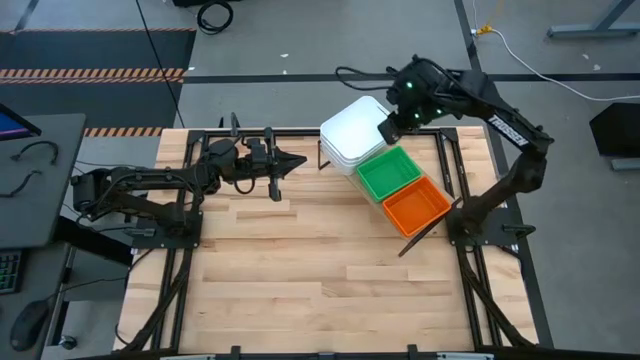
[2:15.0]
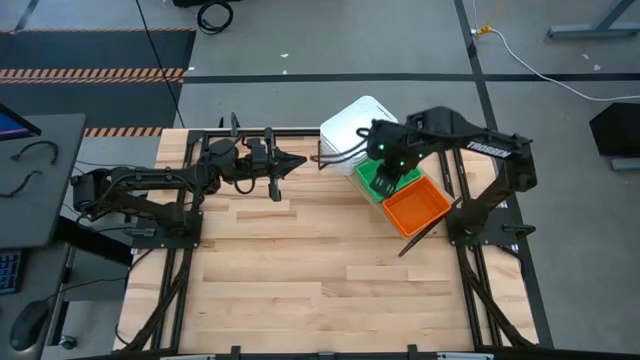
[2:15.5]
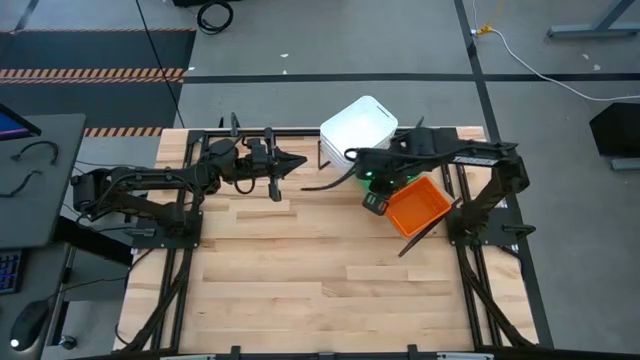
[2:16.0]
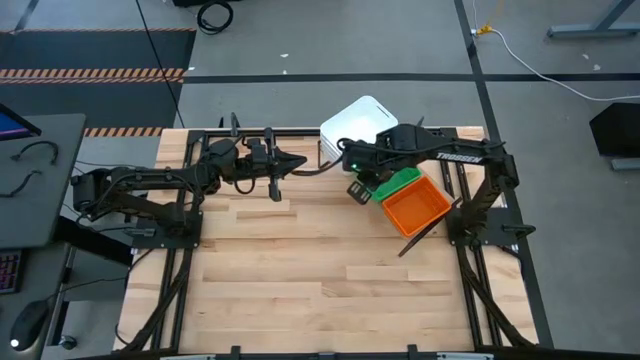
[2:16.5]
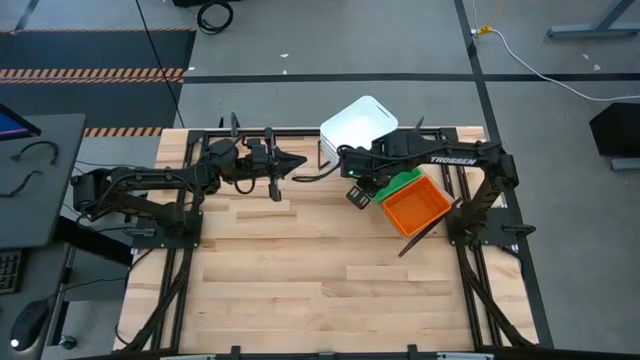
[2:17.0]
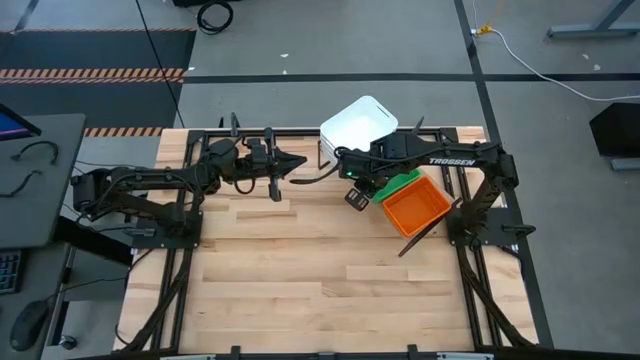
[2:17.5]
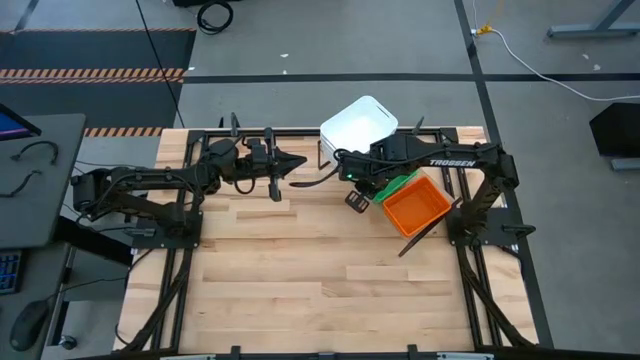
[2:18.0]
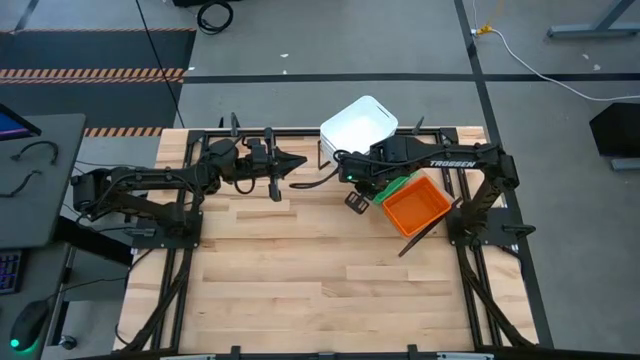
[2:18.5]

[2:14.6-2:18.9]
Task: Stack baskets on shelf by color
Adjust the stack of green bins

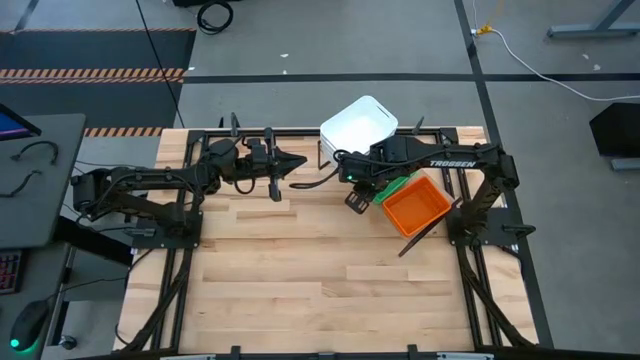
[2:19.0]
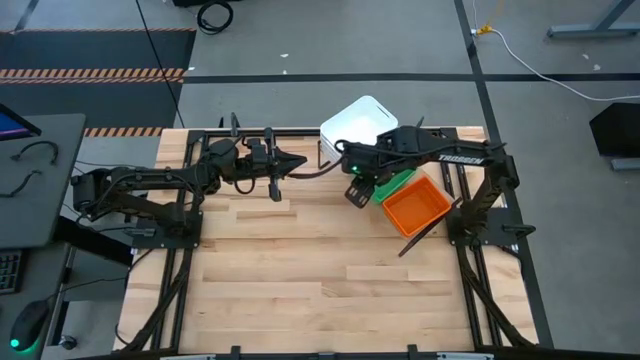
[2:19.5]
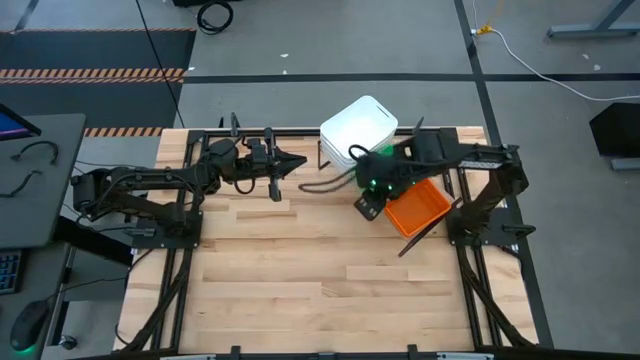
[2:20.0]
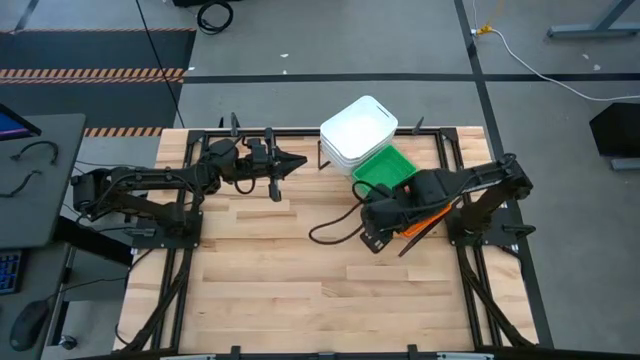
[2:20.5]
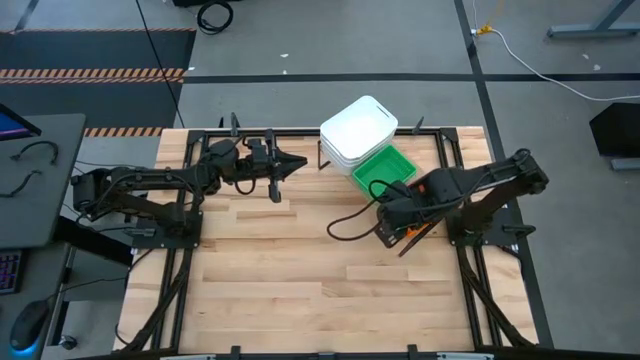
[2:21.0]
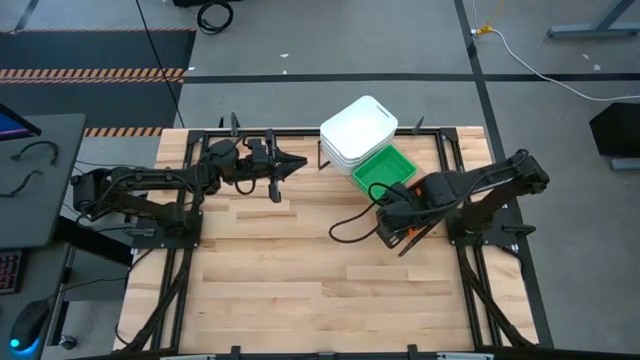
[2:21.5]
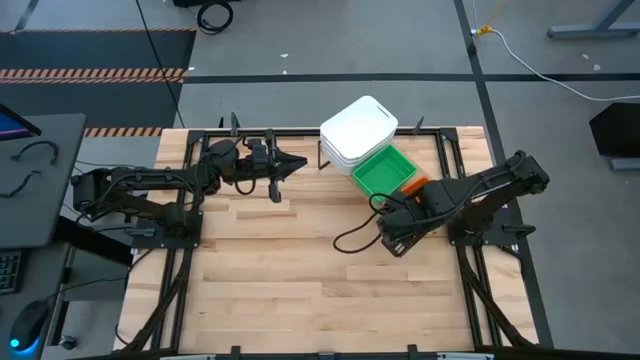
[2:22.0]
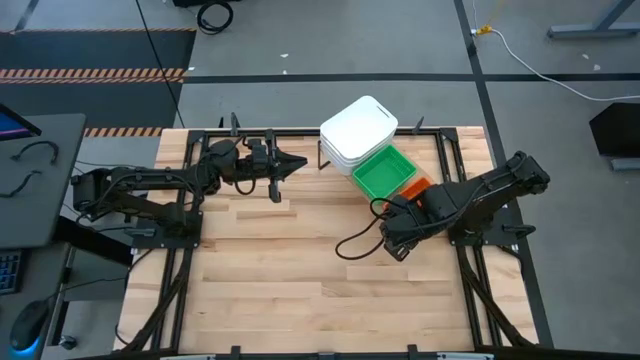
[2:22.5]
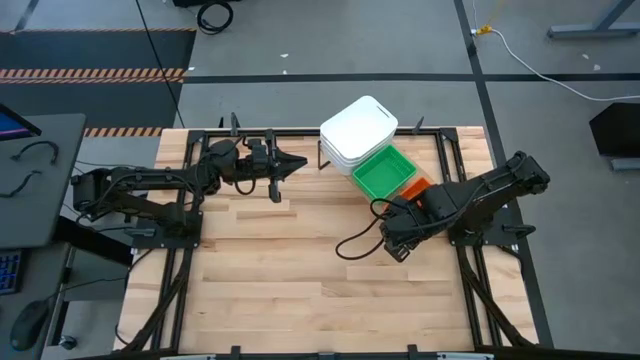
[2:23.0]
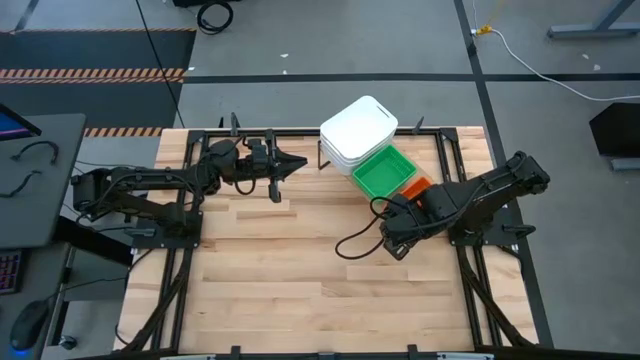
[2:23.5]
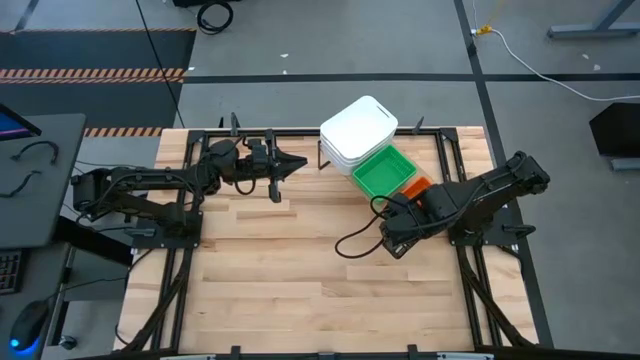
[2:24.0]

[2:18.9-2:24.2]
Adjust the stack of orange bins

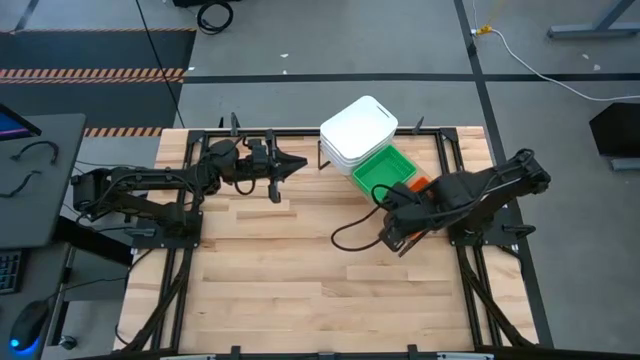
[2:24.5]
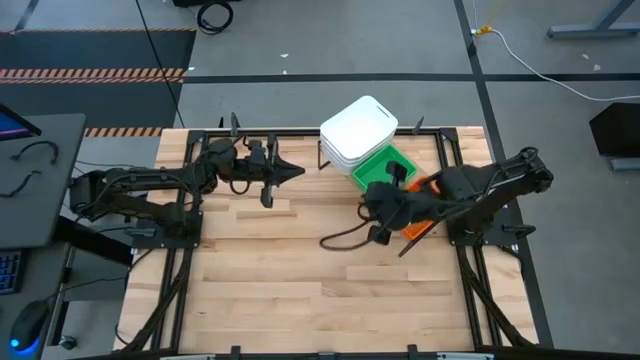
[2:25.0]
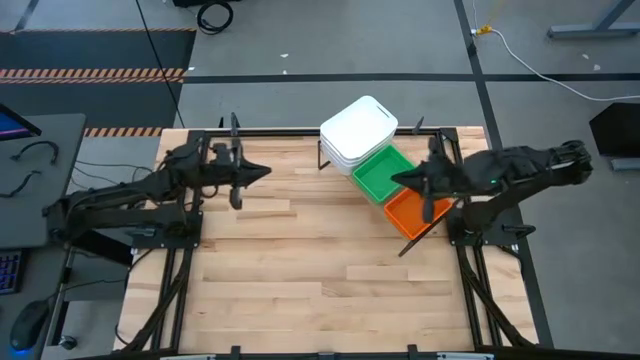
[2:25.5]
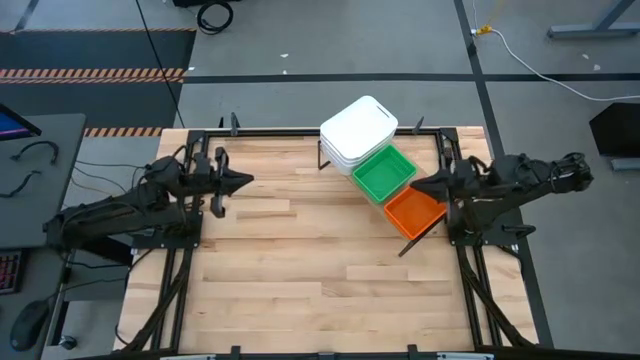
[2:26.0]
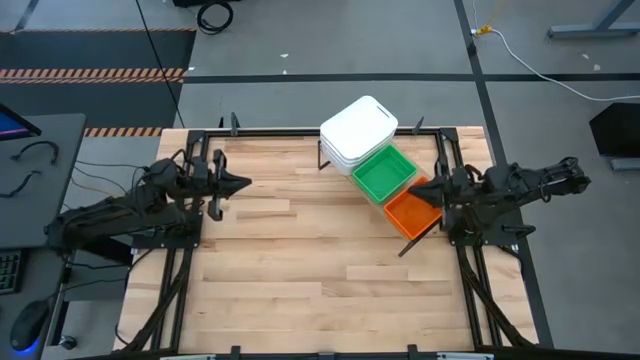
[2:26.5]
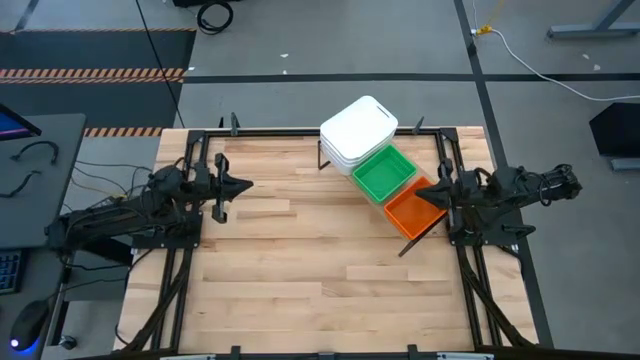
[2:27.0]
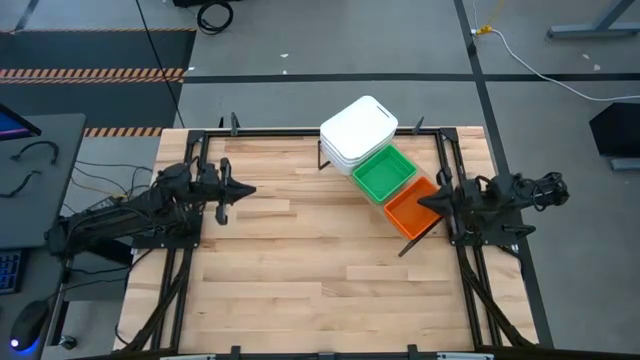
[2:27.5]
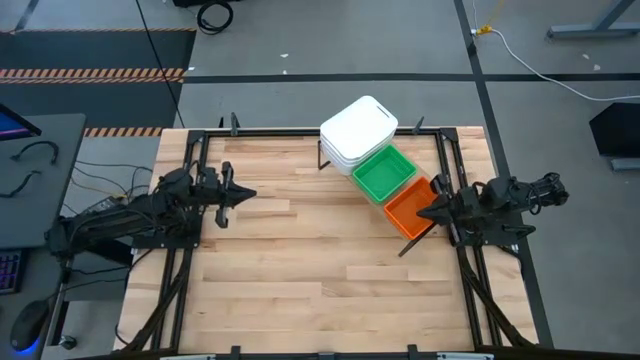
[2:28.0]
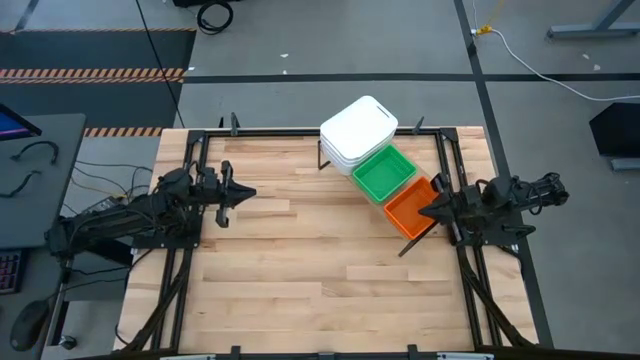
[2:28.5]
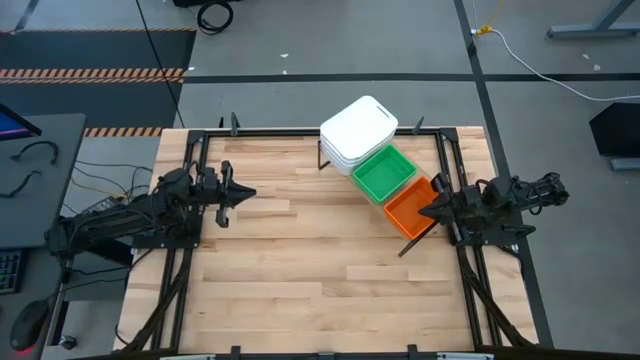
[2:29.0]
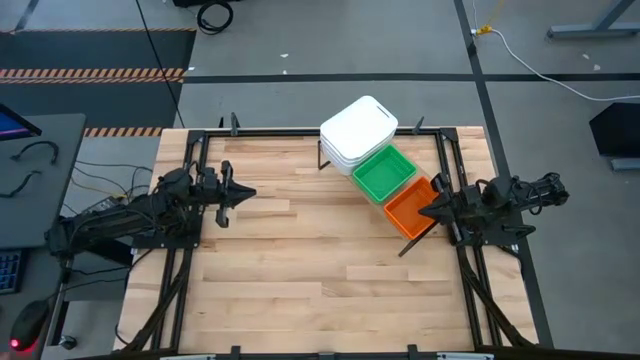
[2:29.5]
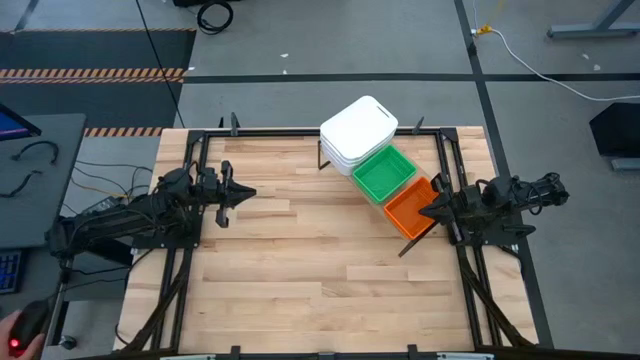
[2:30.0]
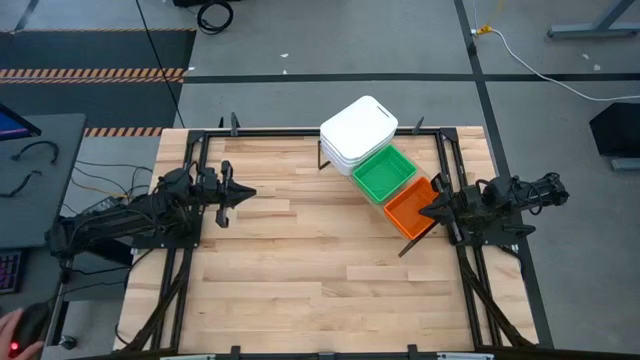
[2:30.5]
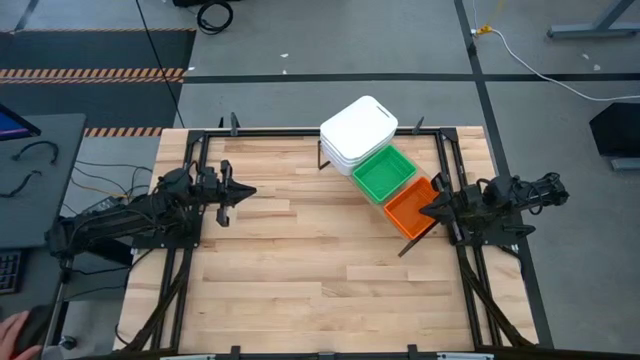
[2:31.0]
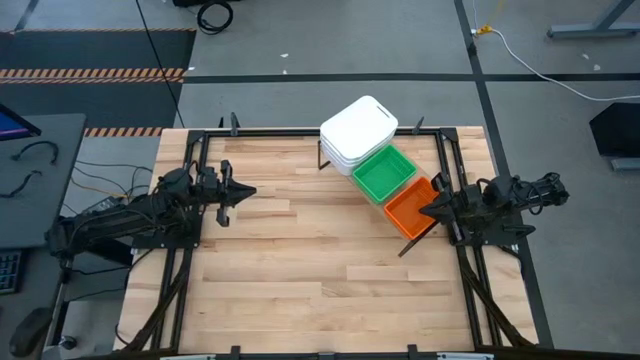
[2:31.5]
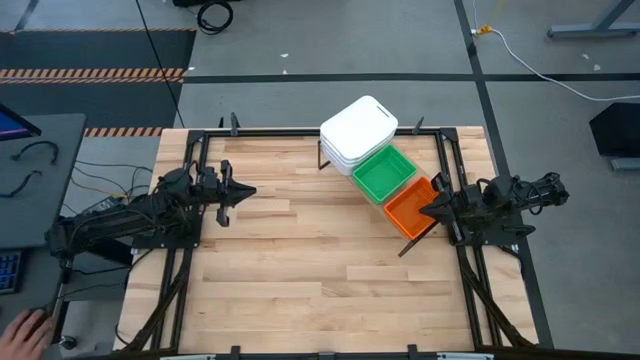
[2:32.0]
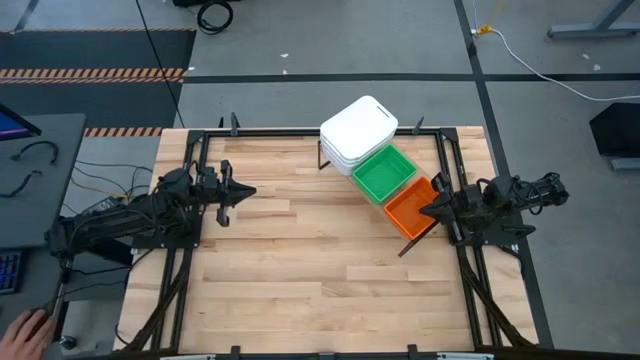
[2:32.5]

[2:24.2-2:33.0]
Return to Home Position

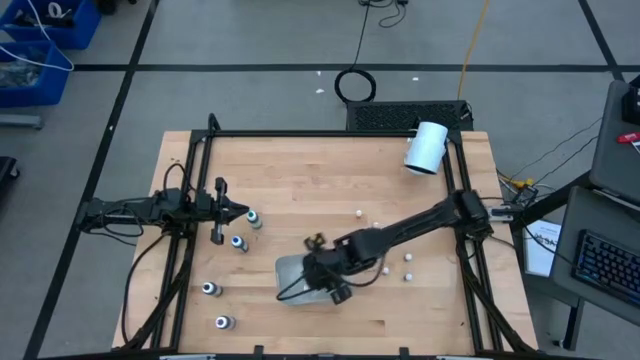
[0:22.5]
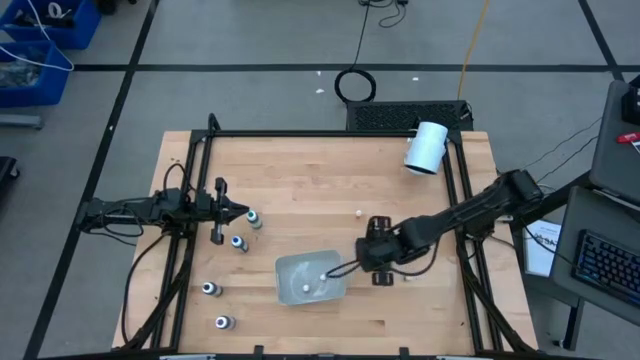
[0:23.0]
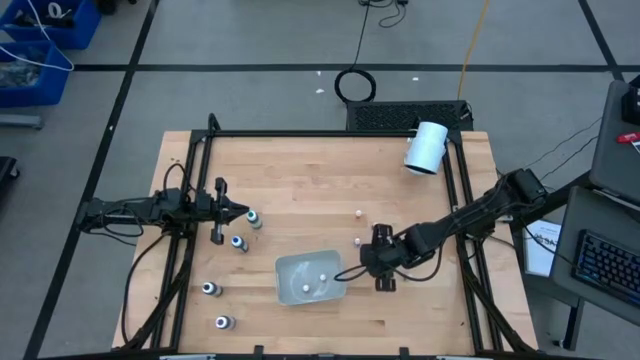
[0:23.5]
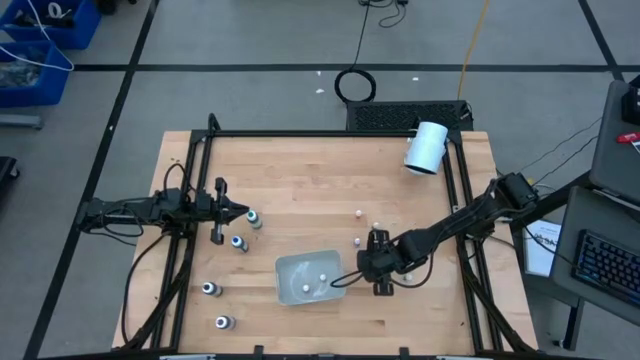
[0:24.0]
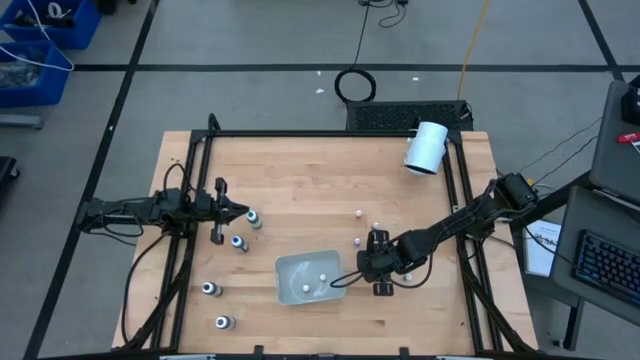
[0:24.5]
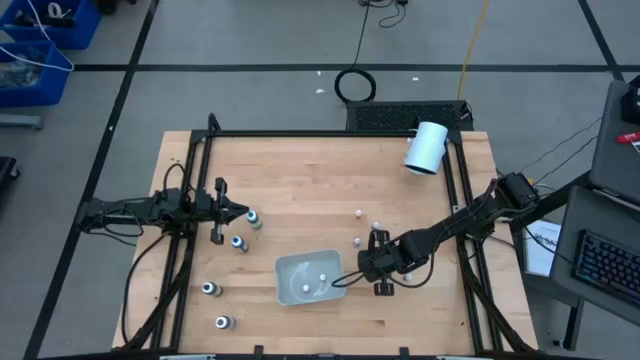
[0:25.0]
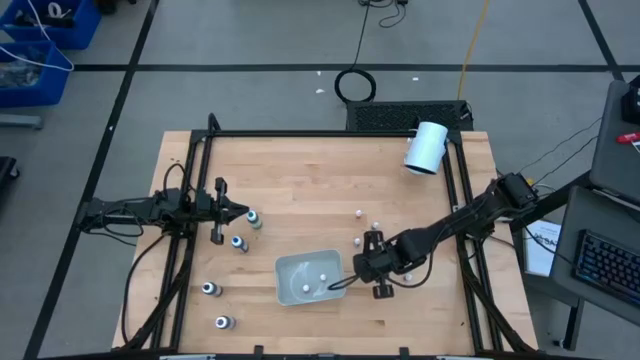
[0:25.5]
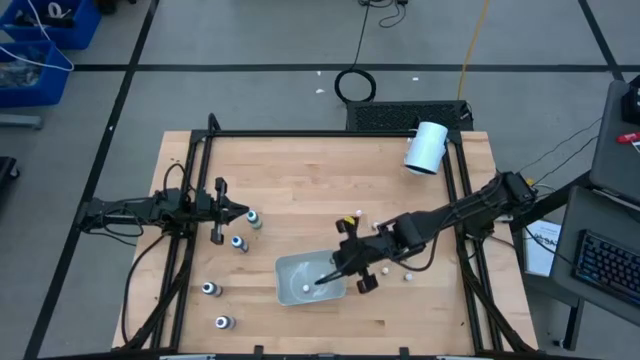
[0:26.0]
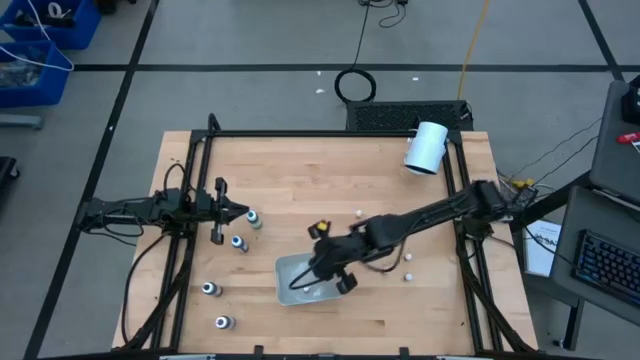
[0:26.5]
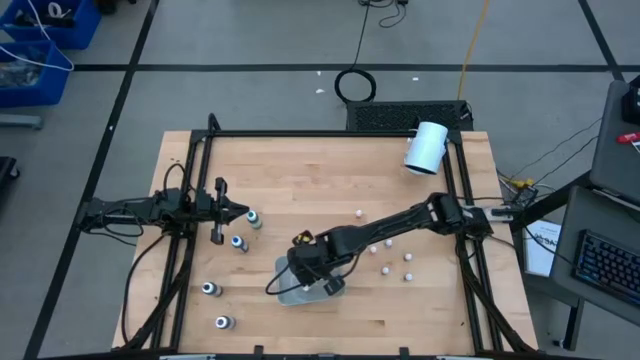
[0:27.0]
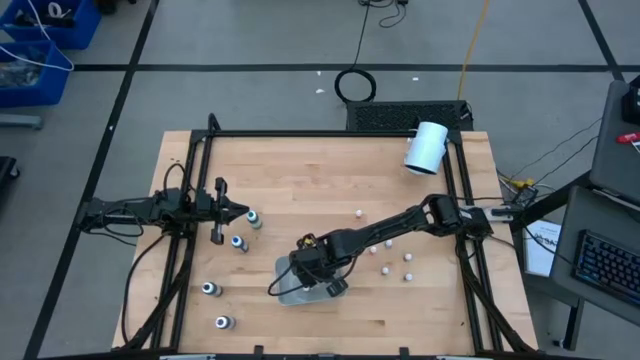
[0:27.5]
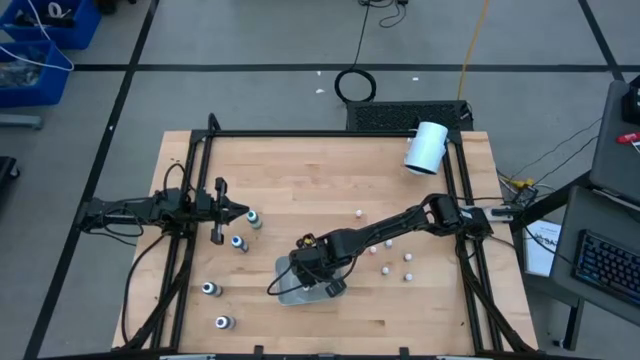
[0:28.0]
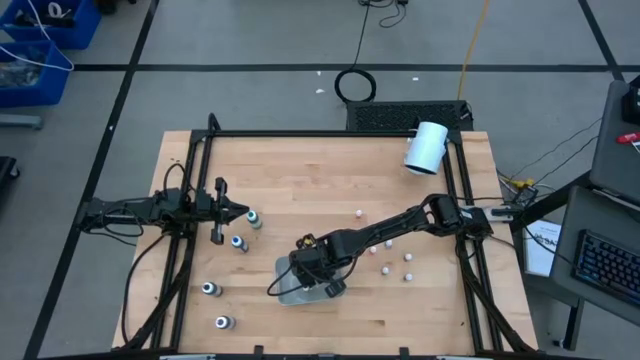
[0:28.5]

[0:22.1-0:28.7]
Task: Pick & Place food coloring
Put the small black food coloring bottle in the gray bin
